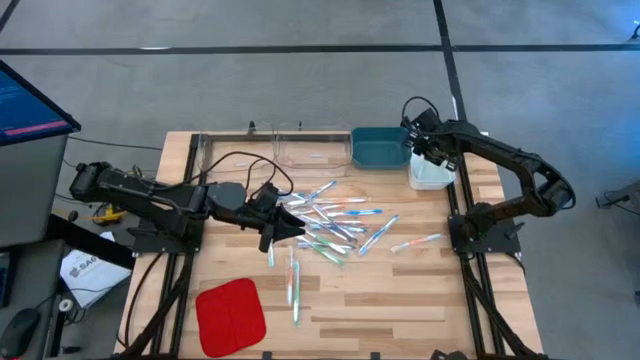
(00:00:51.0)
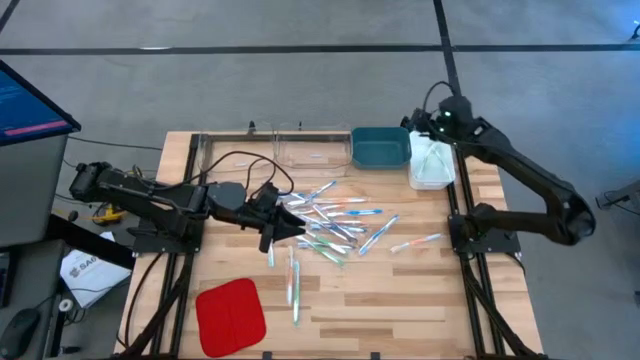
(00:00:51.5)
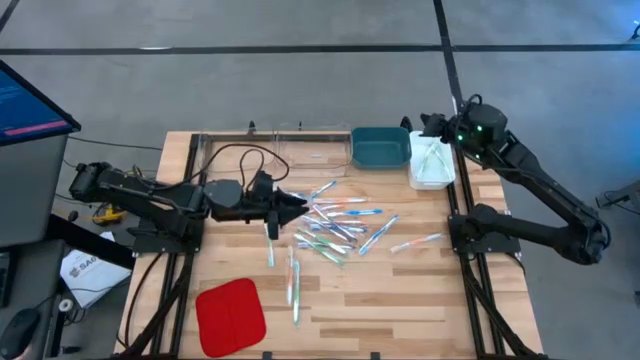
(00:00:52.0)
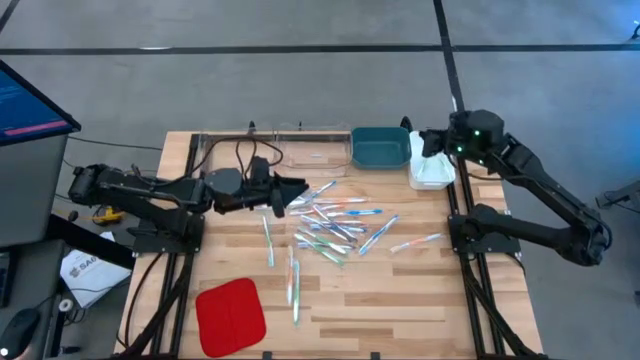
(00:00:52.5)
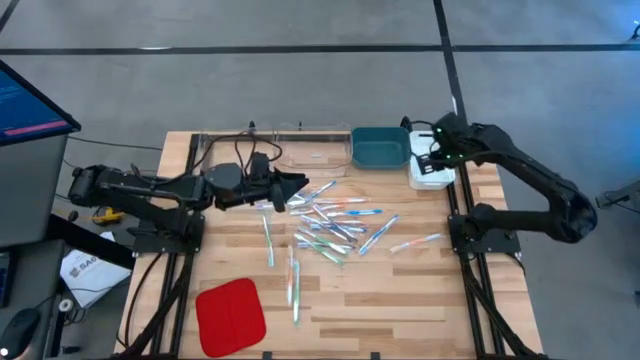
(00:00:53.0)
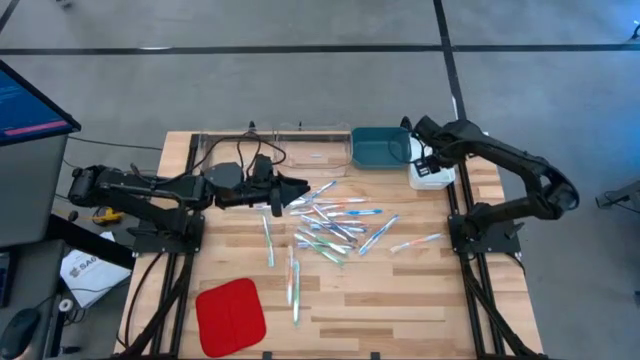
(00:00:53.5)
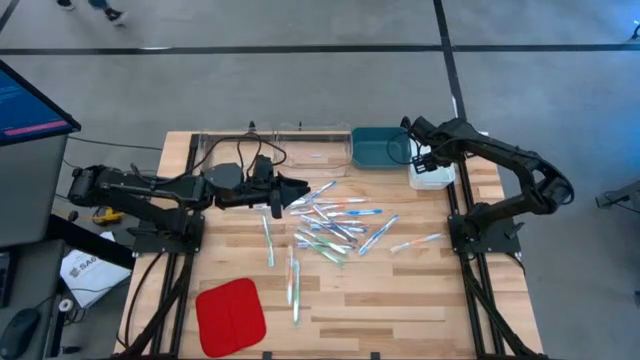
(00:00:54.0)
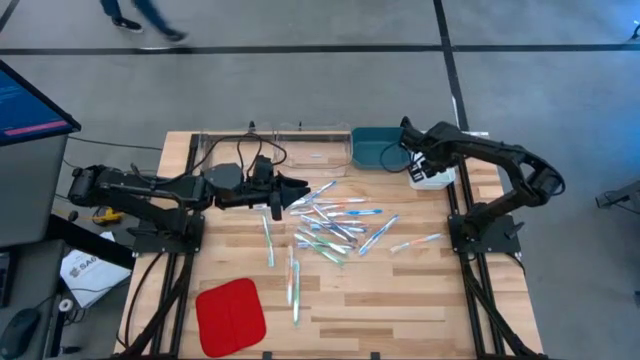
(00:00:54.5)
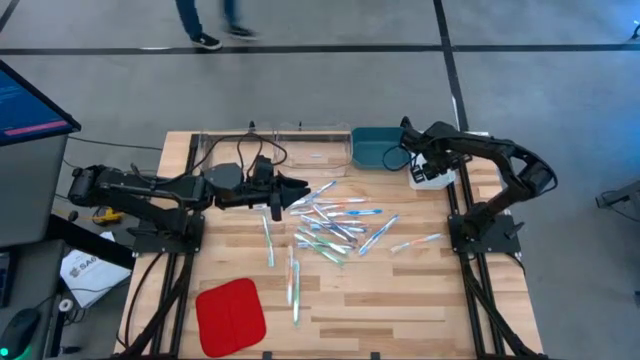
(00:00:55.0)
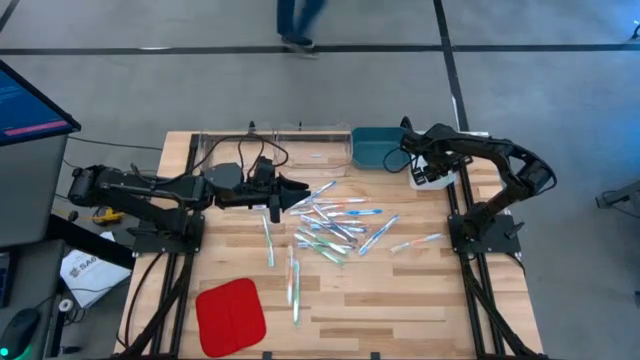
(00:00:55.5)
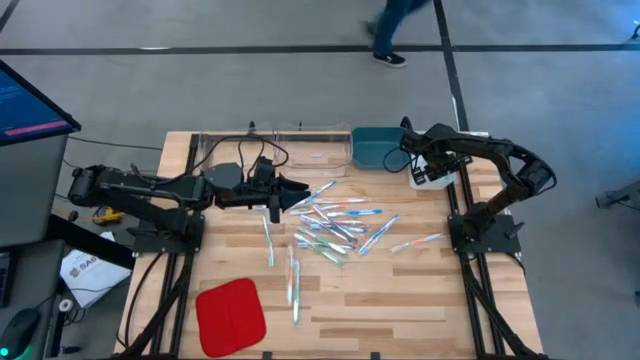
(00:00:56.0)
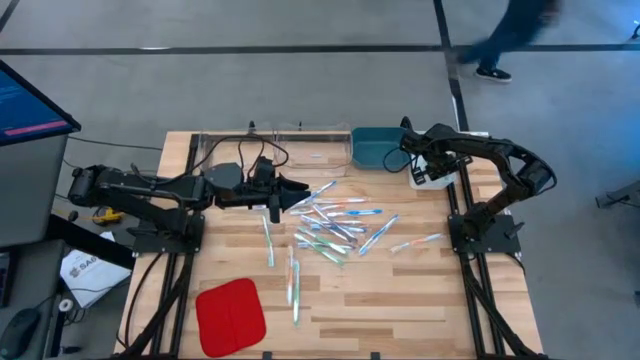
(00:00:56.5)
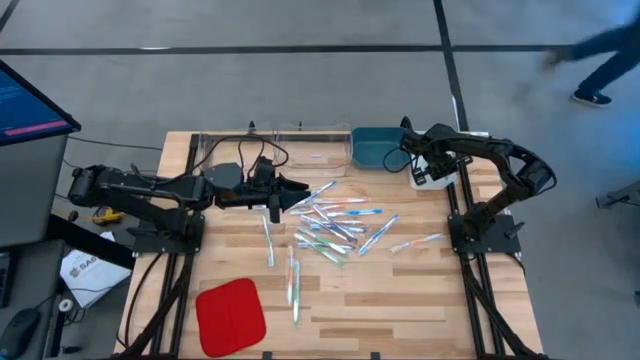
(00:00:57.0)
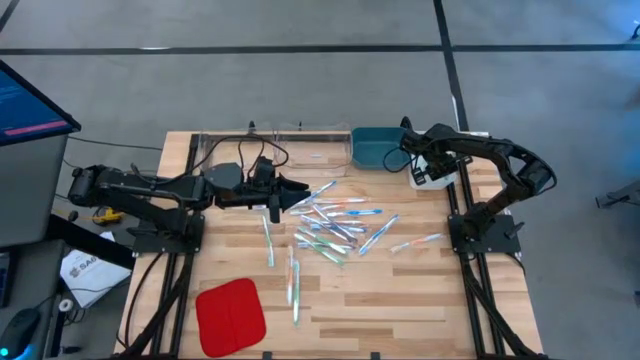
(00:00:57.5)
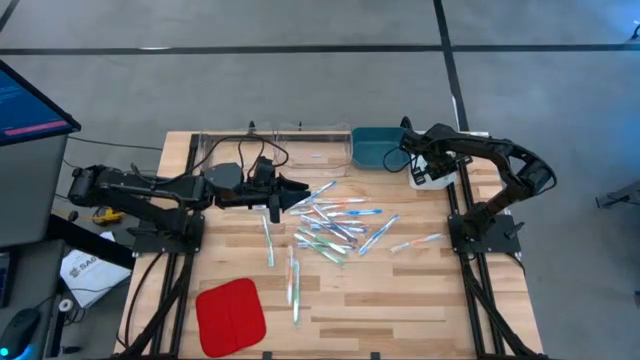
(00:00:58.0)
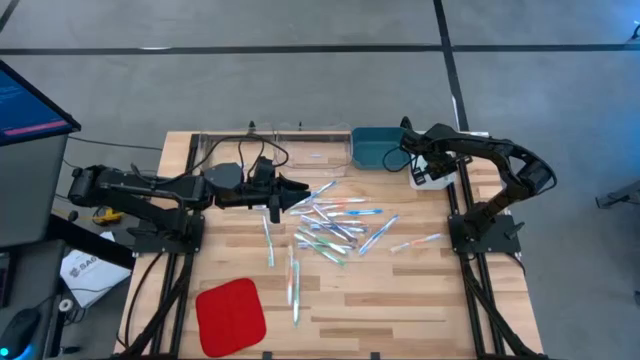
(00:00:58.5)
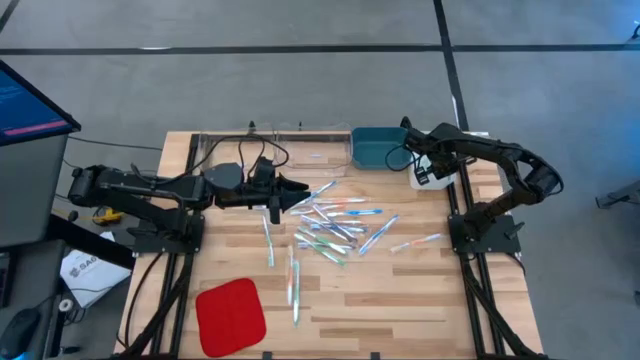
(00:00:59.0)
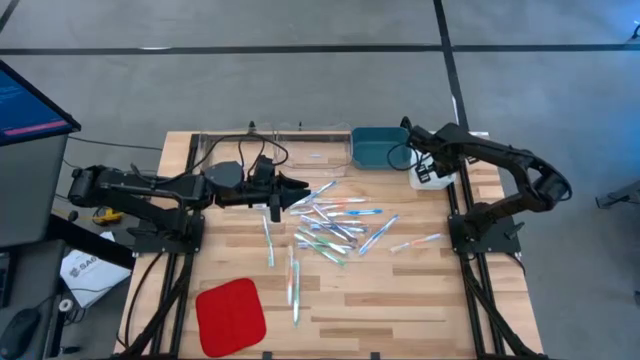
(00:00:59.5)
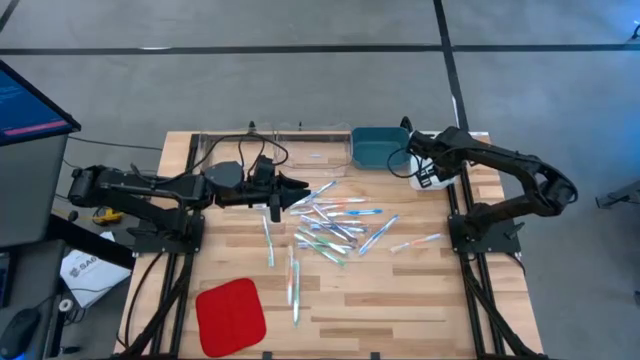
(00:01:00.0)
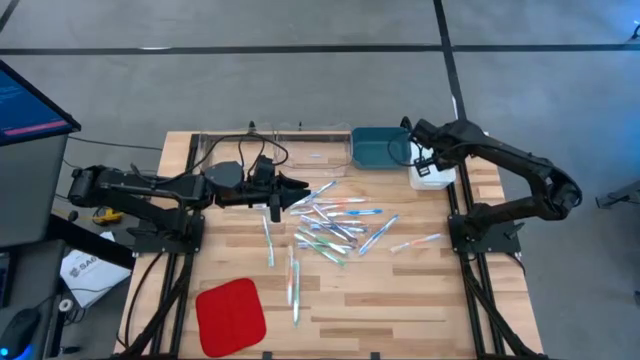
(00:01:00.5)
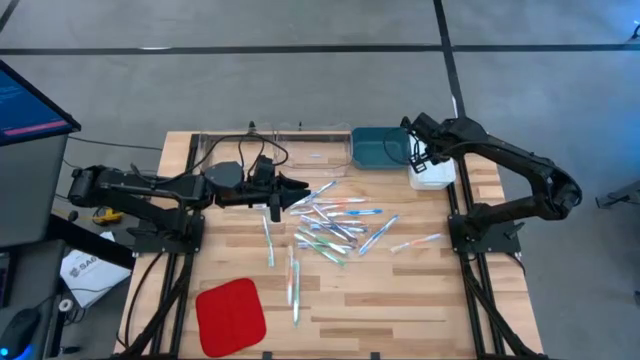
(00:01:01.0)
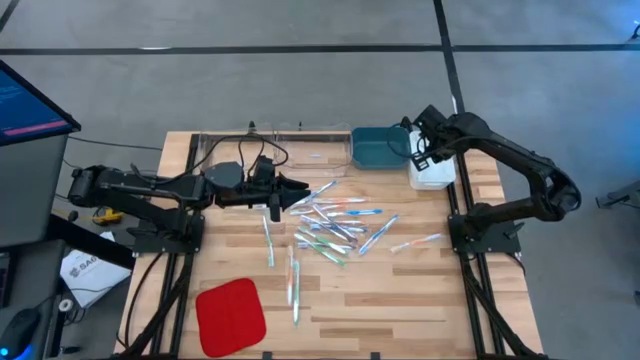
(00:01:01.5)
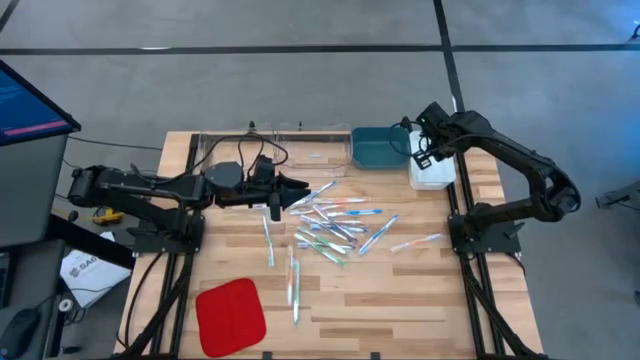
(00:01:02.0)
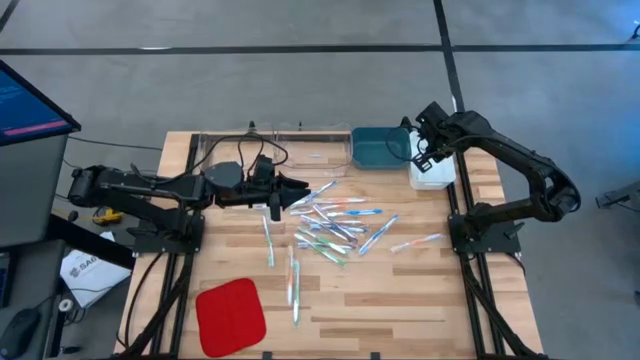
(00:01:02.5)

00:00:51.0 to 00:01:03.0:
Task: Pick & Place Toothbrushes
Adjust the green toothbrush in the white bin

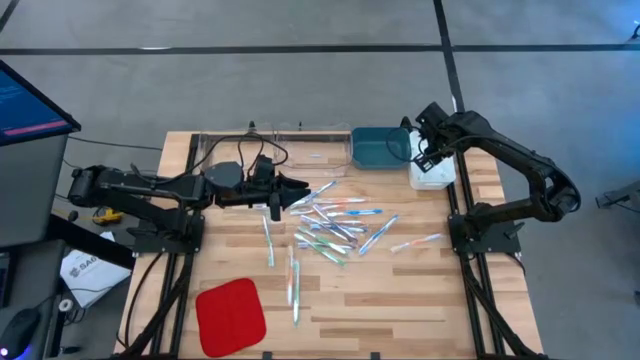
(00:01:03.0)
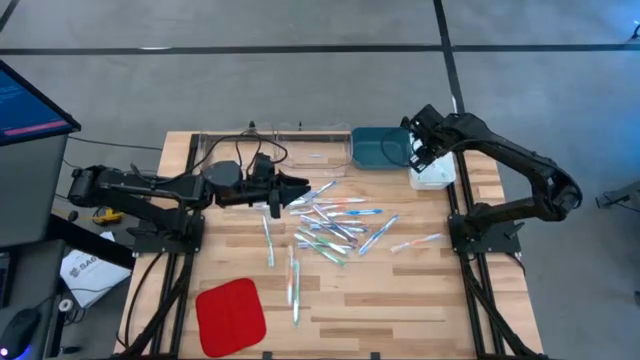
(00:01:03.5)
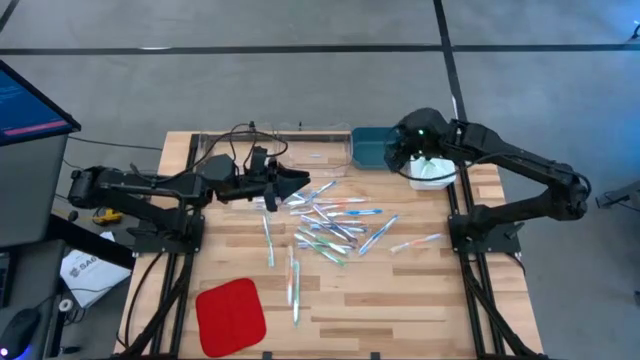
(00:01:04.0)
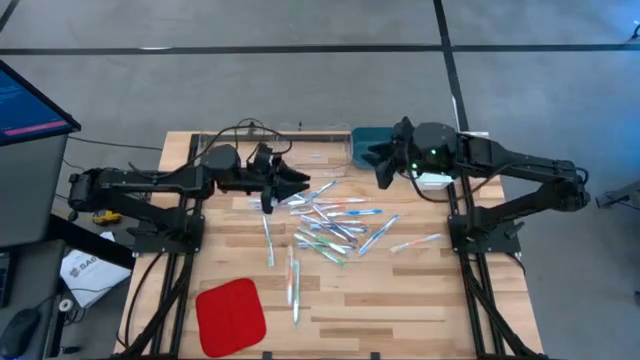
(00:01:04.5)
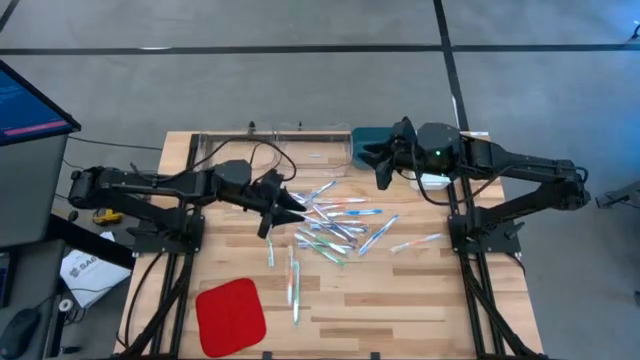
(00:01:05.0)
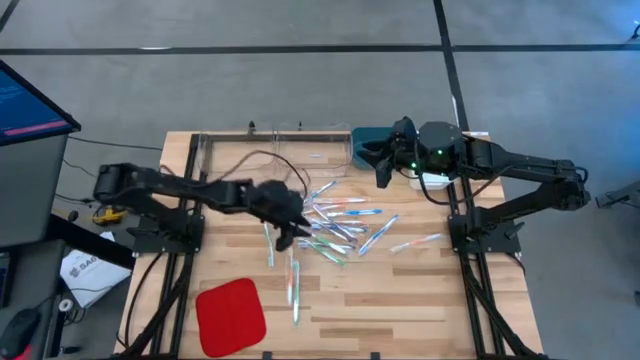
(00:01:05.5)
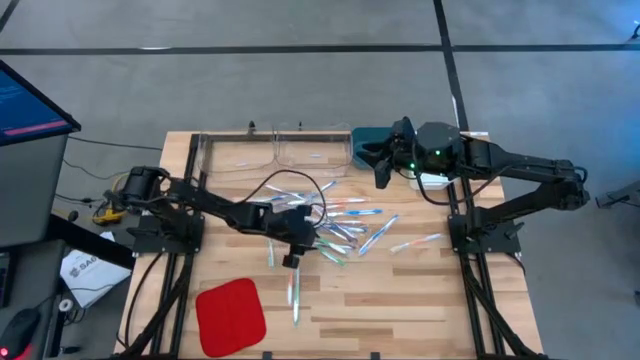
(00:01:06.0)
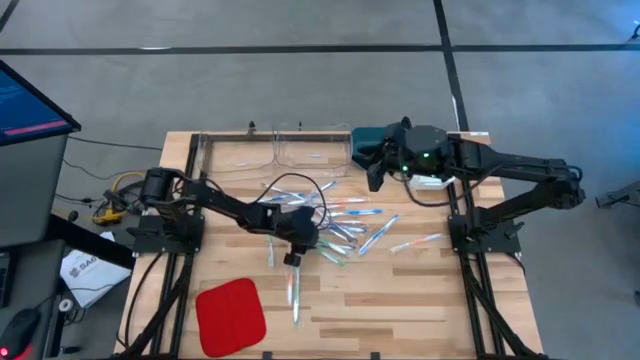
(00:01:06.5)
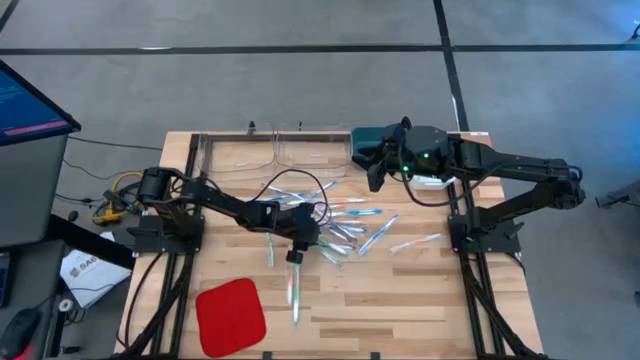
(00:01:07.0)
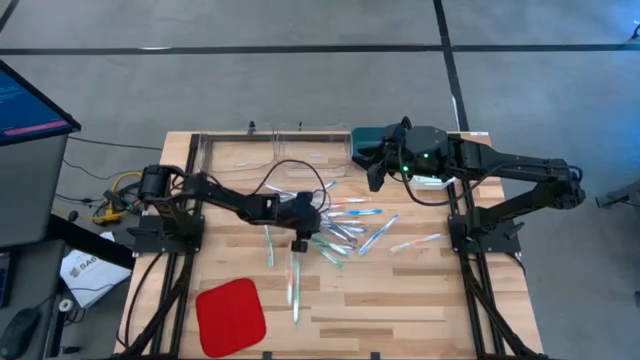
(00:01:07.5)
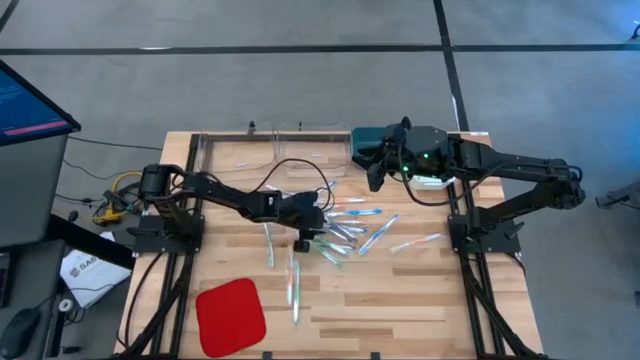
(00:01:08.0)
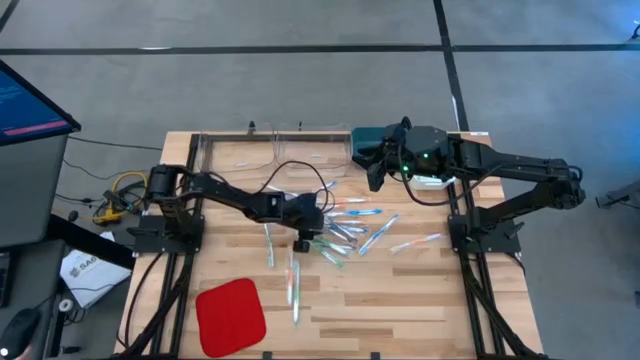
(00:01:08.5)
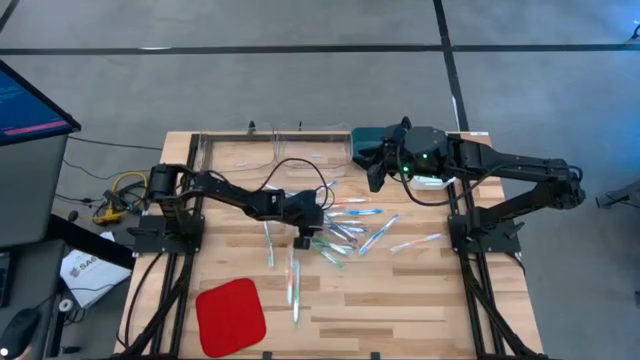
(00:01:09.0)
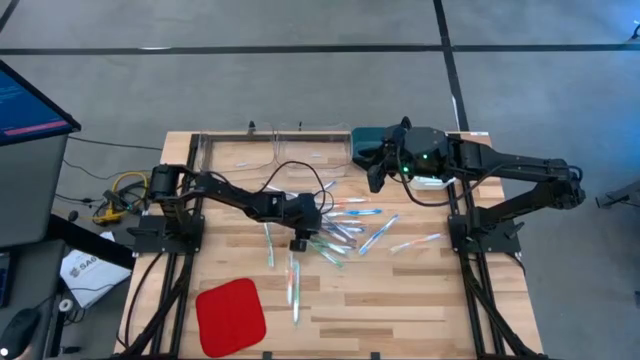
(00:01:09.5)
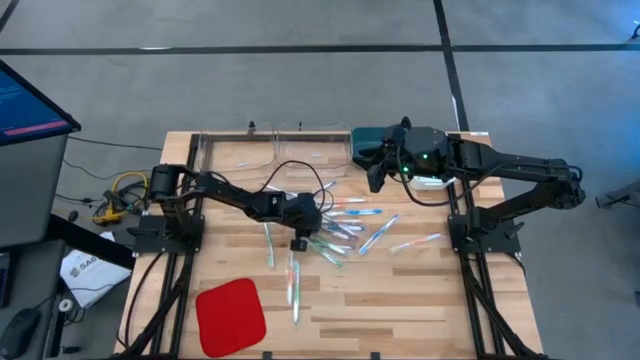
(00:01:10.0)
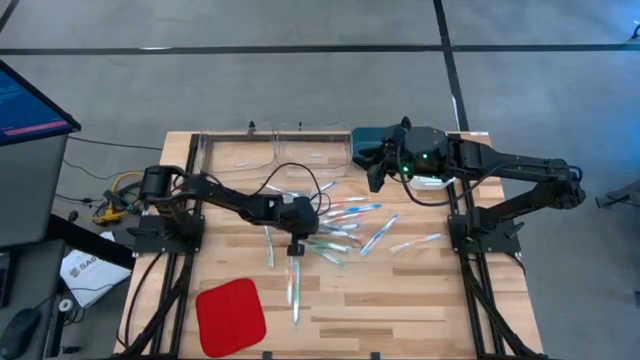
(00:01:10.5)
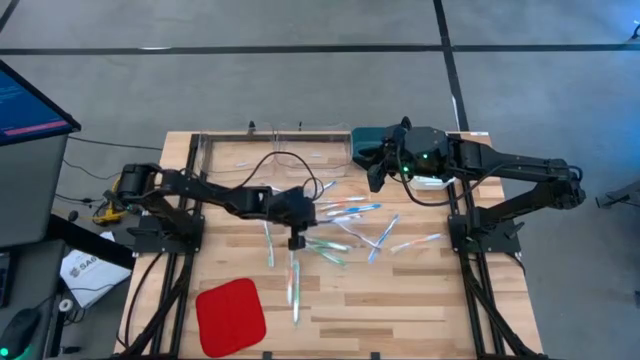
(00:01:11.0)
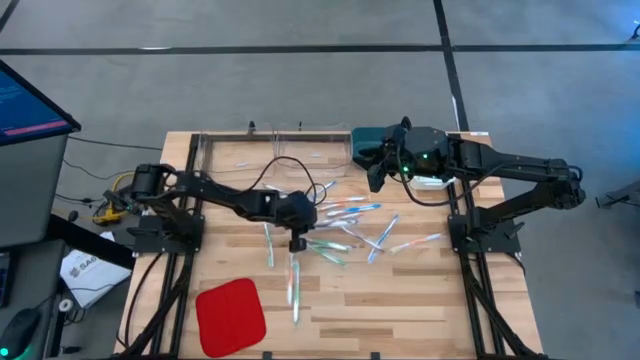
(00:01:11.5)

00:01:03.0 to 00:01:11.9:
Put the violet toothbrush into the left transparent bin
